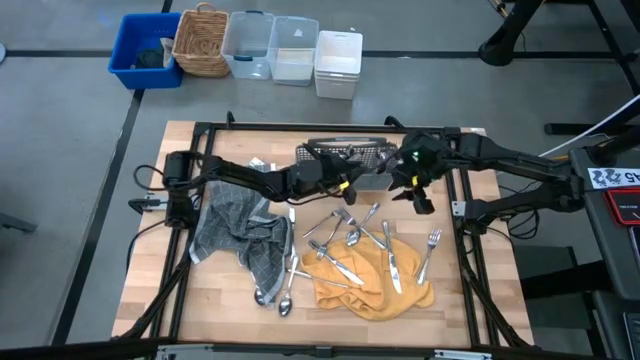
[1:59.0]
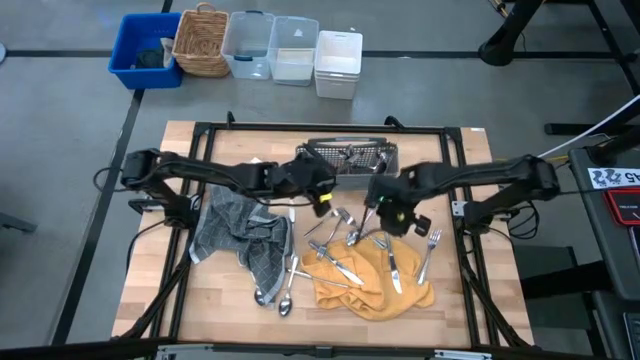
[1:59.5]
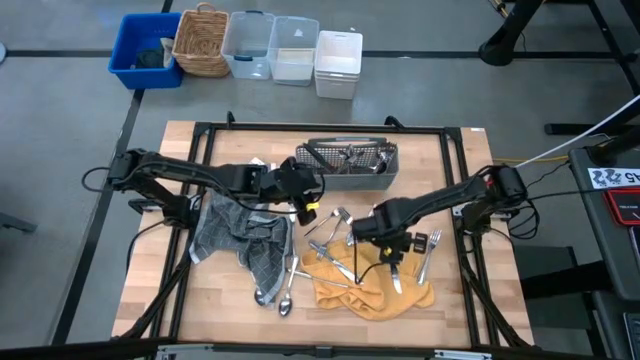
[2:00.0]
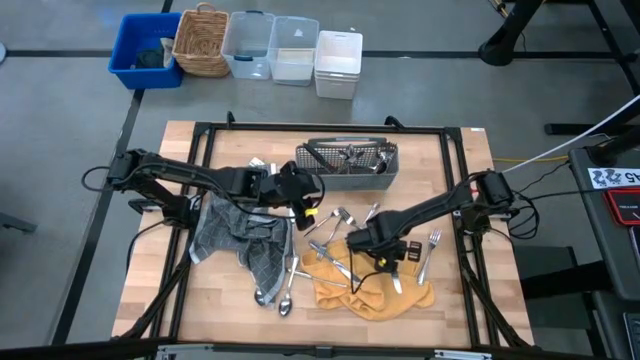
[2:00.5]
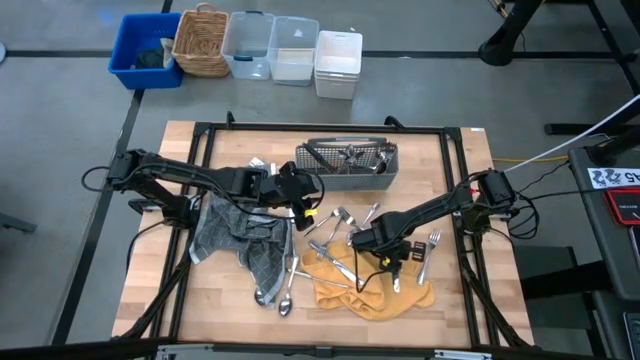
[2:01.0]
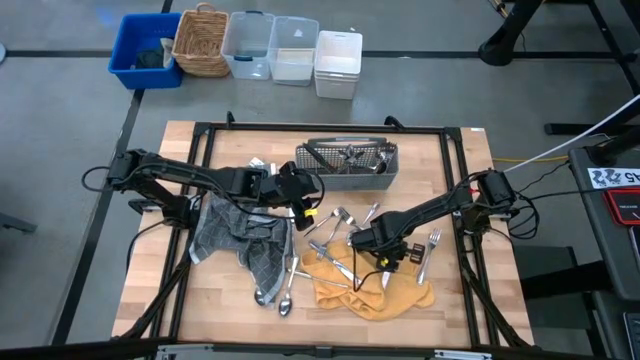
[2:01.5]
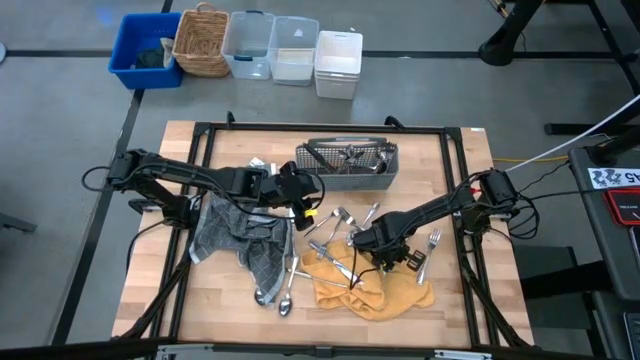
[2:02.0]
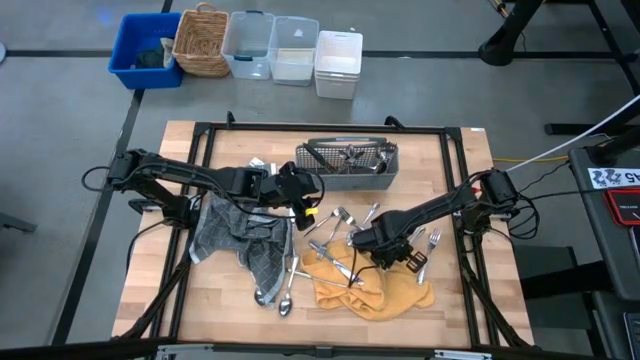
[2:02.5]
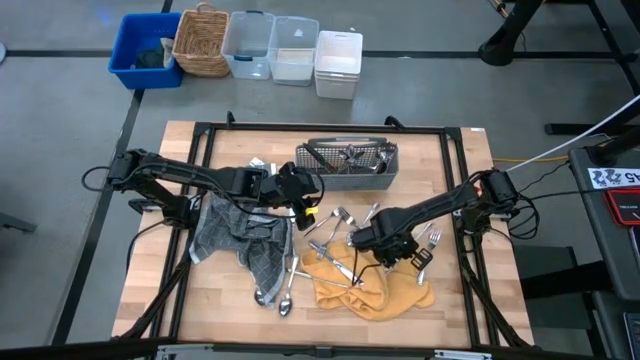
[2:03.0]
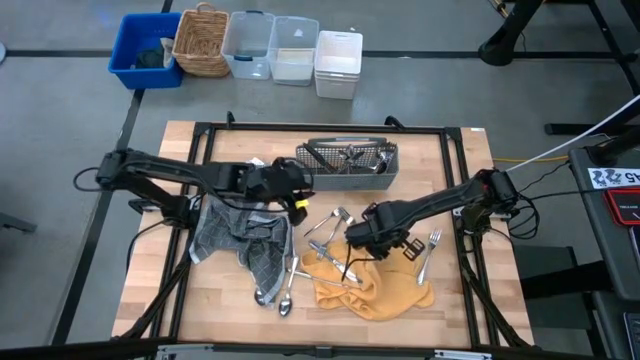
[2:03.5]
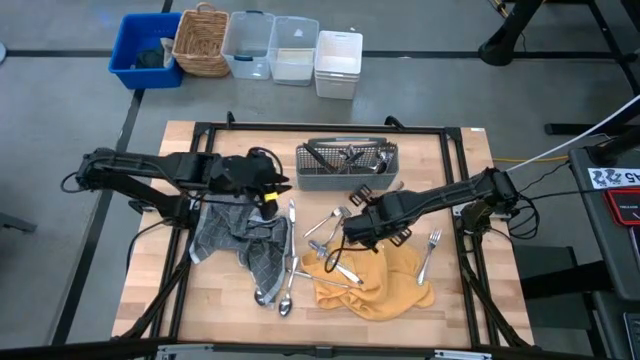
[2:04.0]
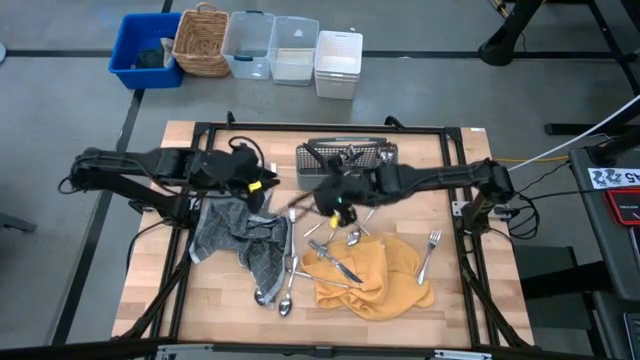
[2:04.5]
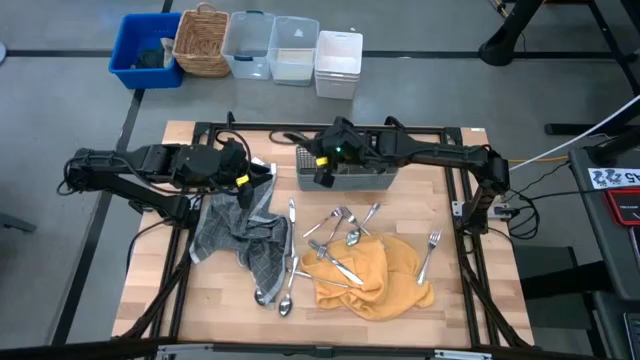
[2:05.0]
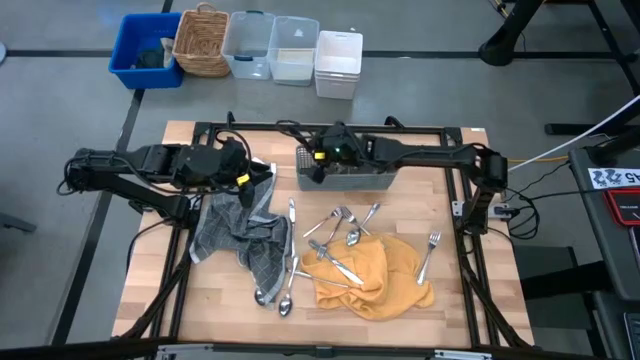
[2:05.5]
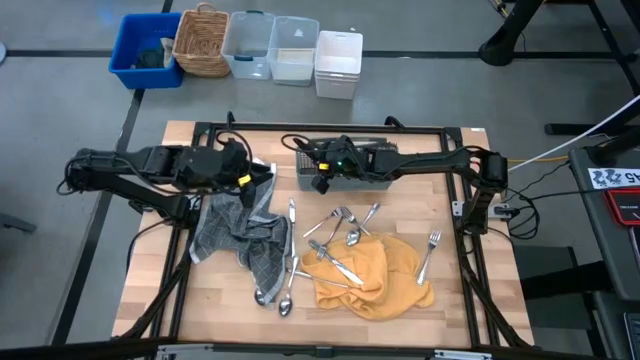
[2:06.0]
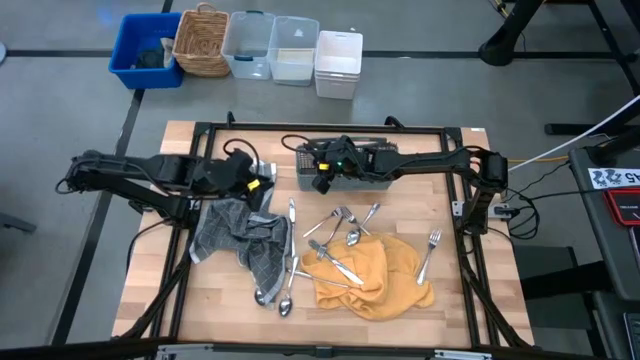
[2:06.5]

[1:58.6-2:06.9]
Task: Sort silverware
Put the silver knife into the gray utensil holder

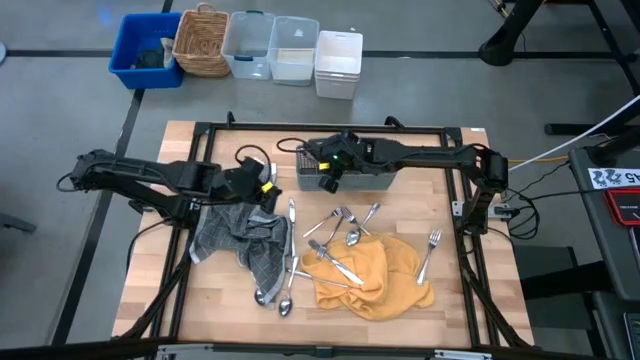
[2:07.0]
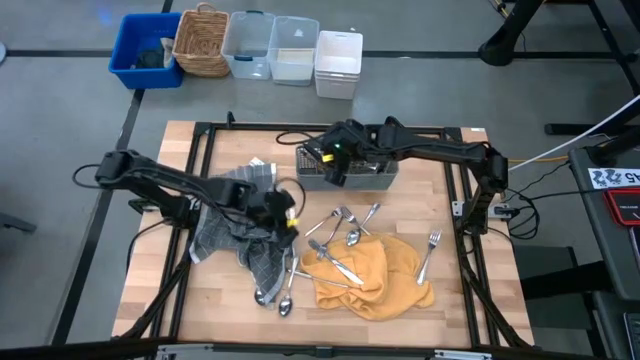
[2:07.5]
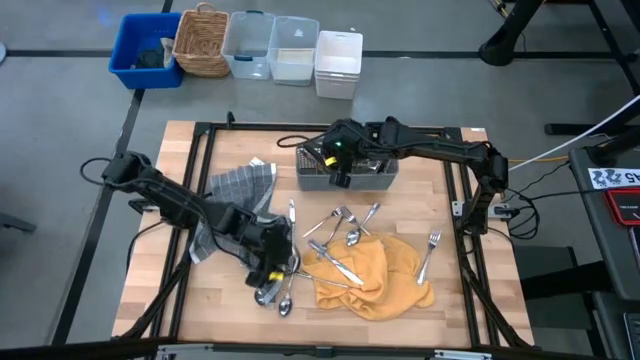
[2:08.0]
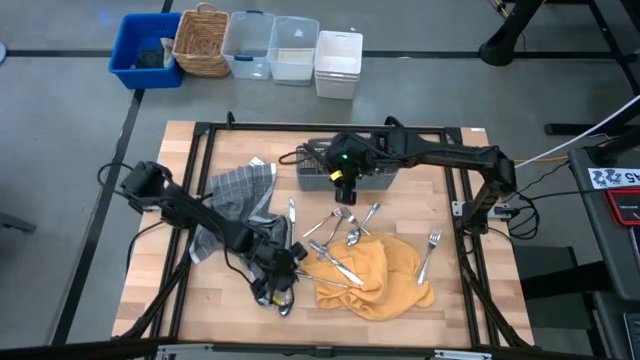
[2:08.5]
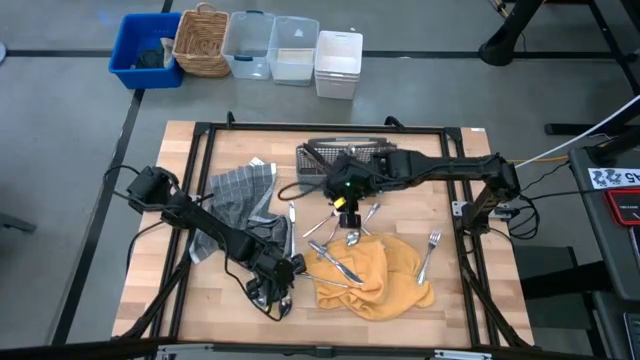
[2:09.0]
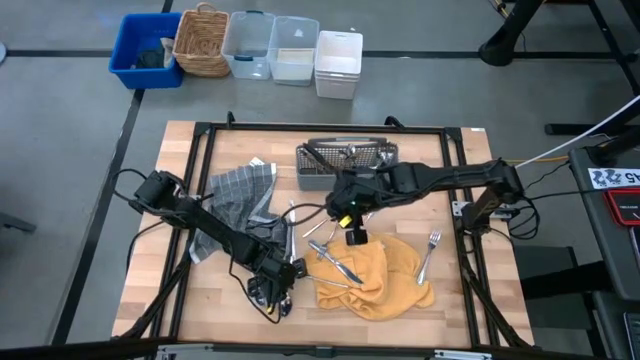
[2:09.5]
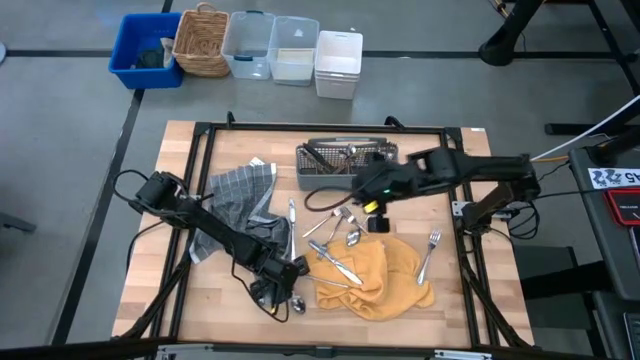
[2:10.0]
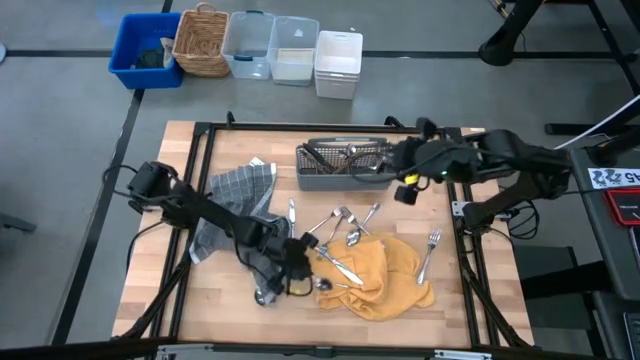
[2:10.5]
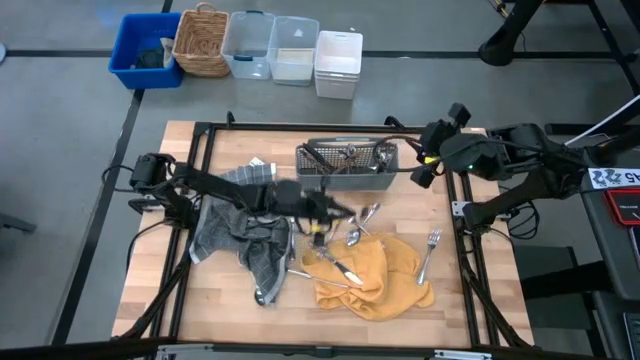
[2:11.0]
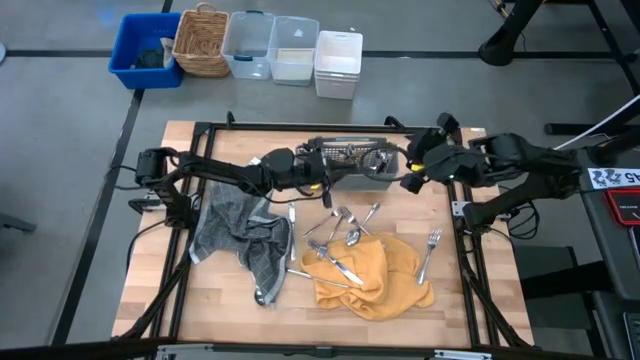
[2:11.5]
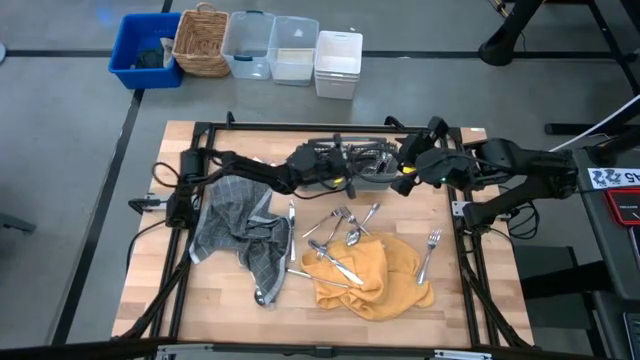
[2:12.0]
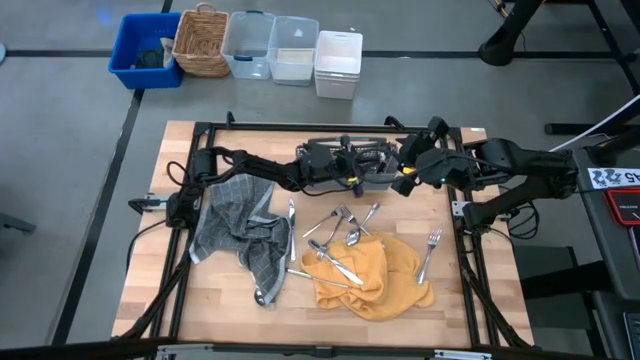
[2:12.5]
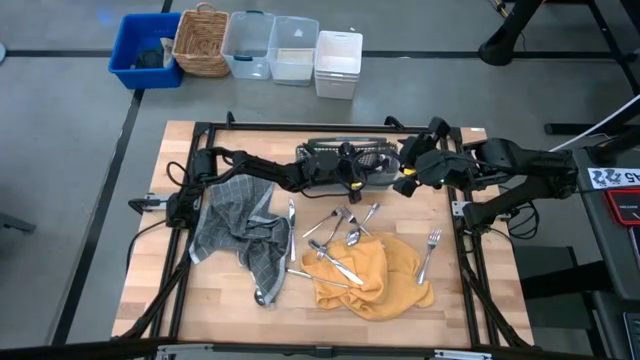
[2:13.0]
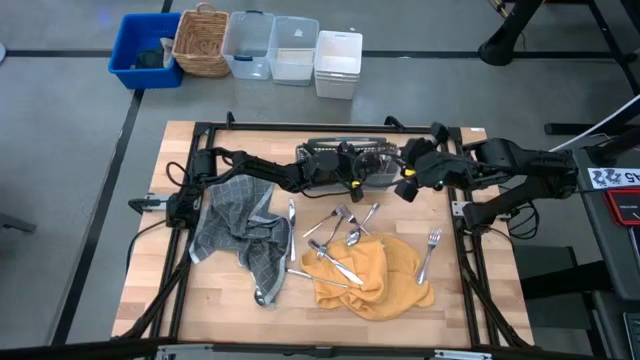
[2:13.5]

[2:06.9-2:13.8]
Put the silver spoon into the gray utensil holder

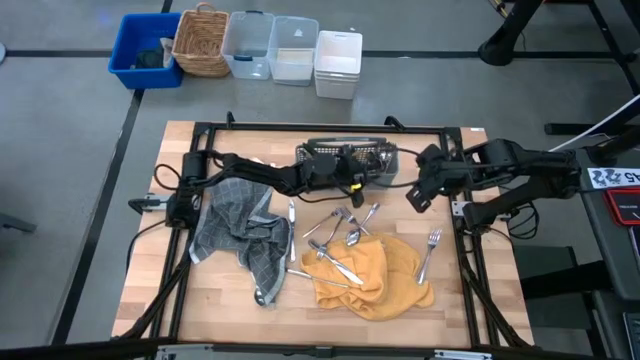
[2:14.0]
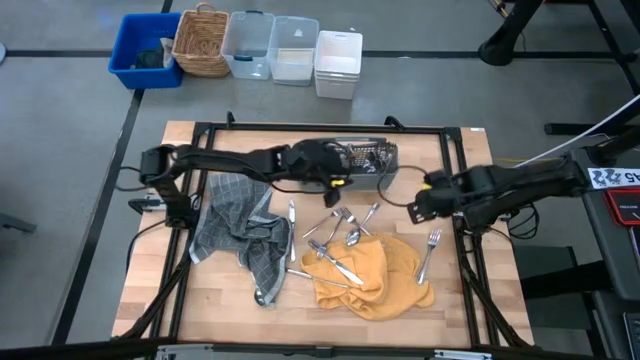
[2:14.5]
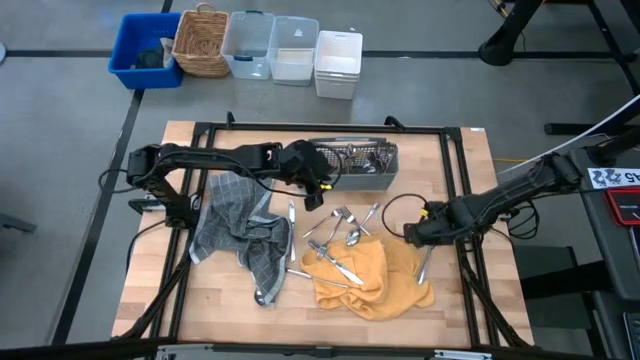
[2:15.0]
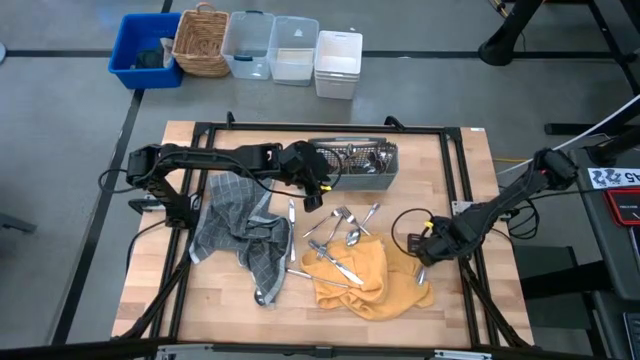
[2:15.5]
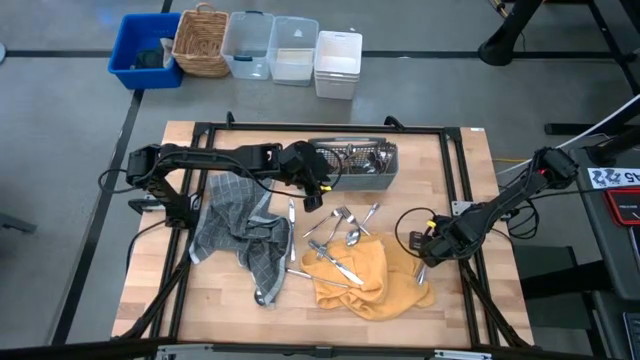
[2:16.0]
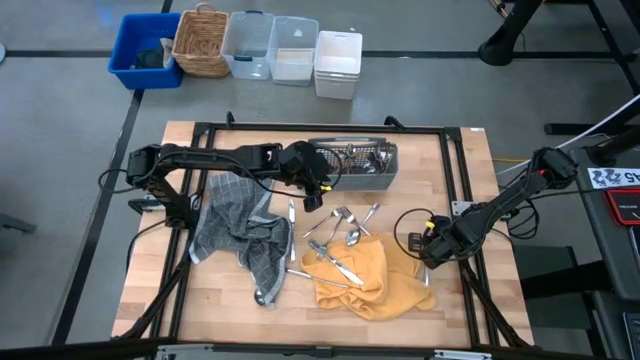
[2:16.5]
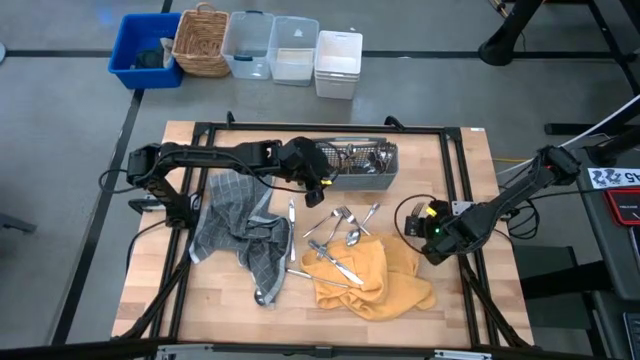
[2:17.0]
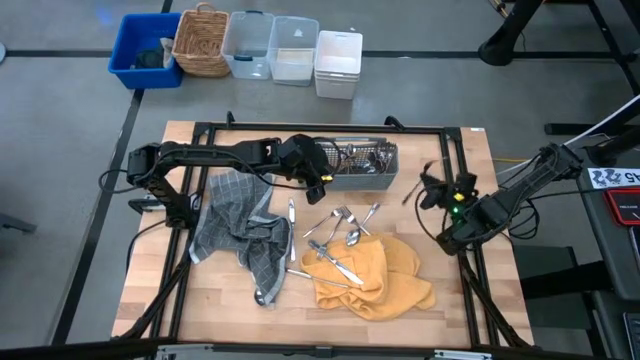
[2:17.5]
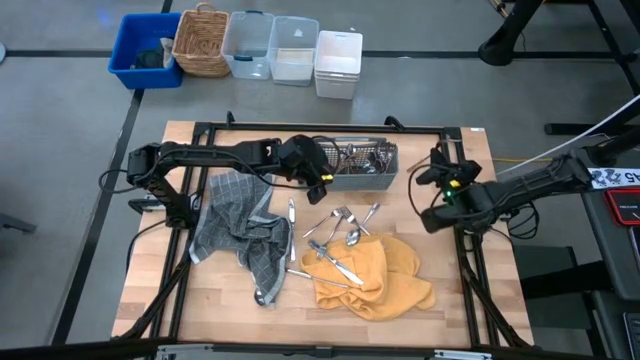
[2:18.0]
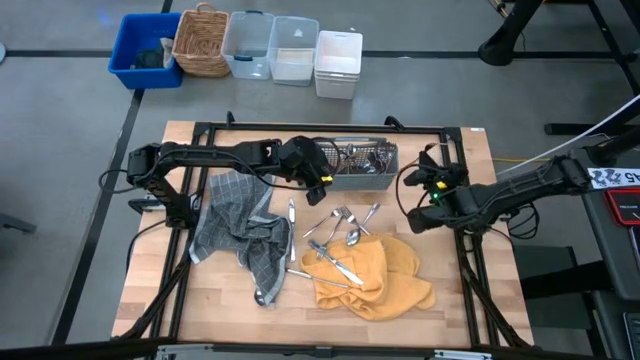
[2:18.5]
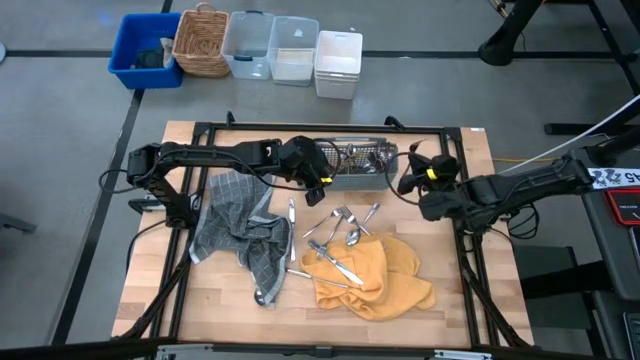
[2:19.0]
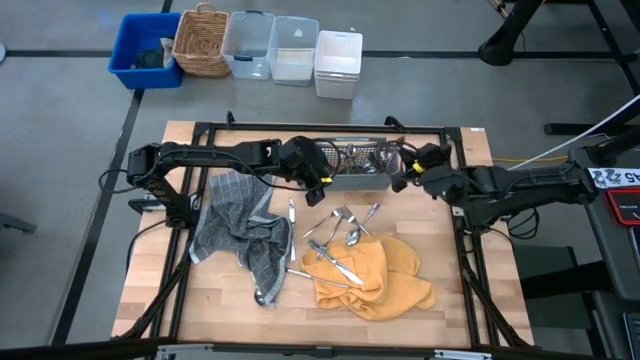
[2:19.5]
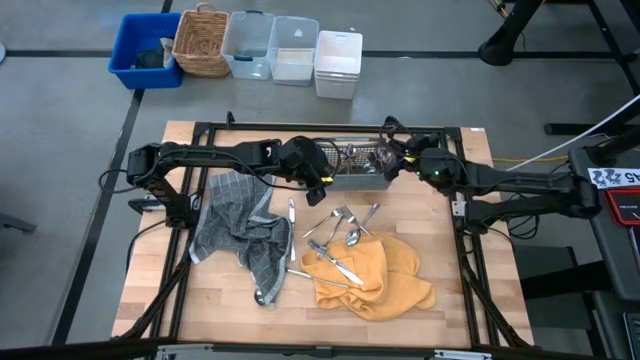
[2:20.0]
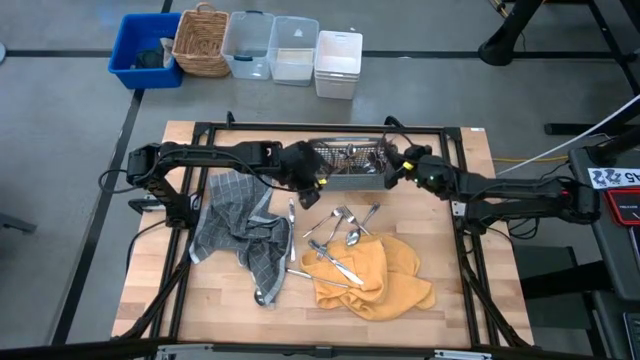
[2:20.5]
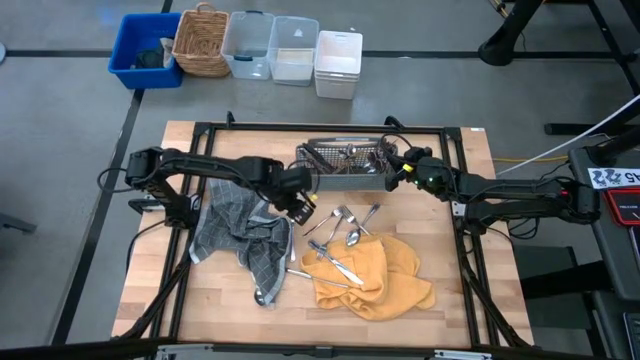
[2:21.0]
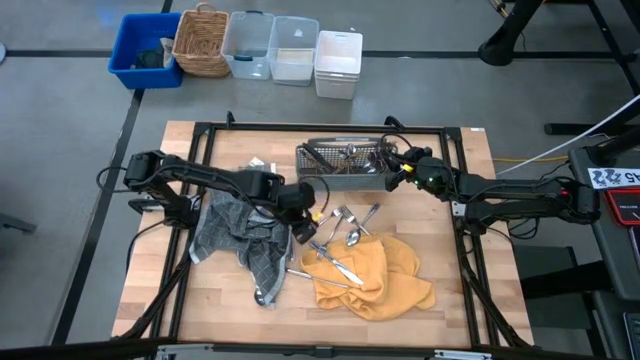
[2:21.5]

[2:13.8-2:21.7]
Put the silver fork into the gray utensil holder
